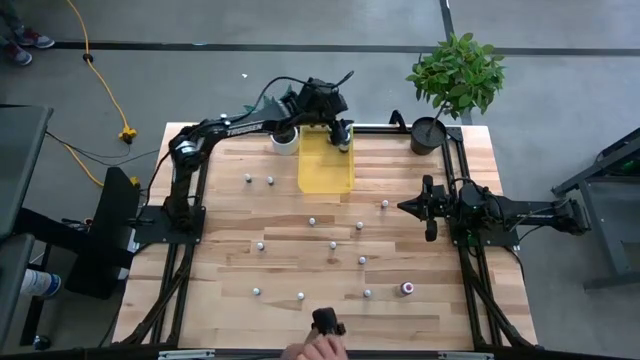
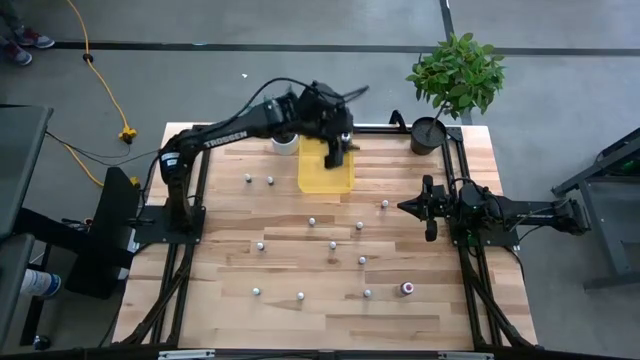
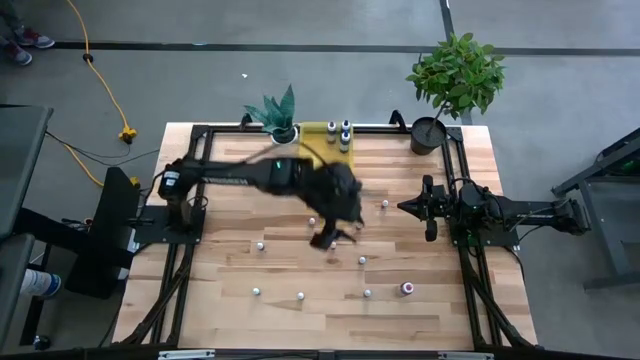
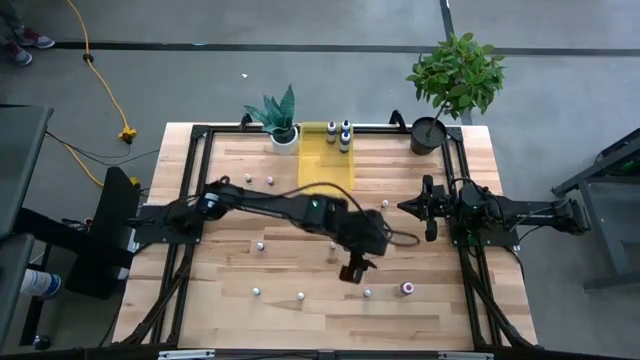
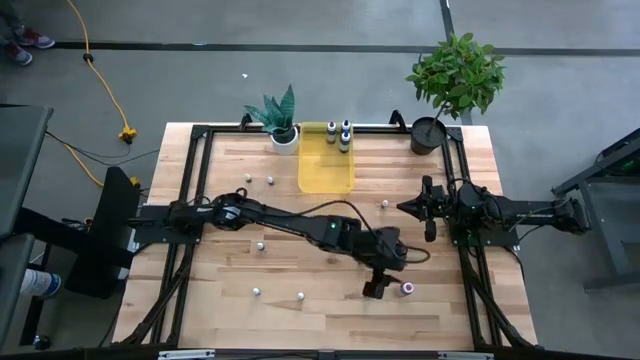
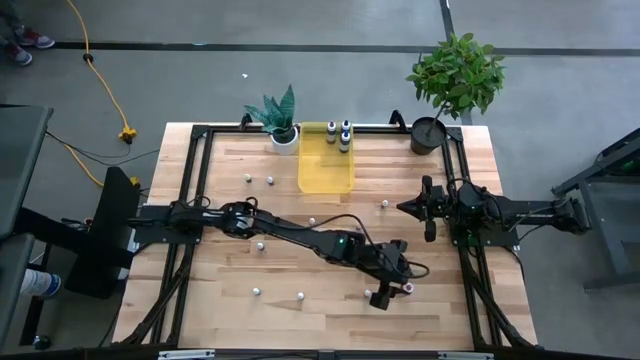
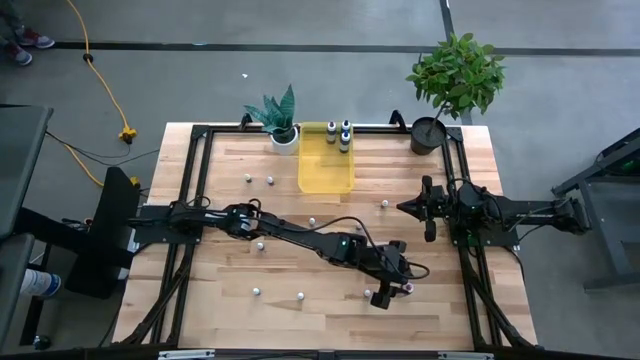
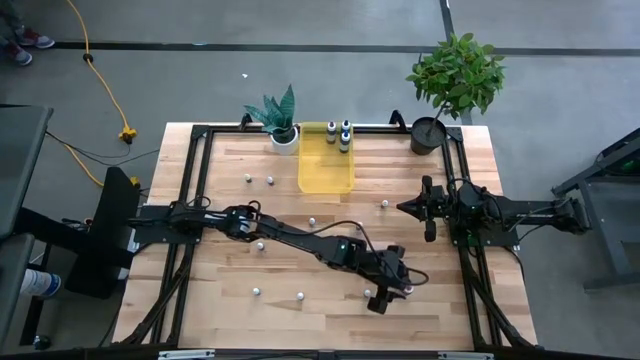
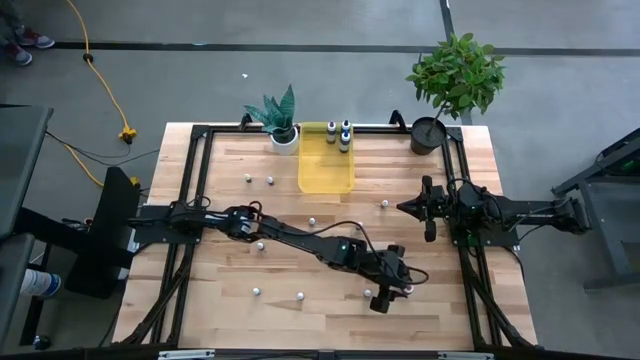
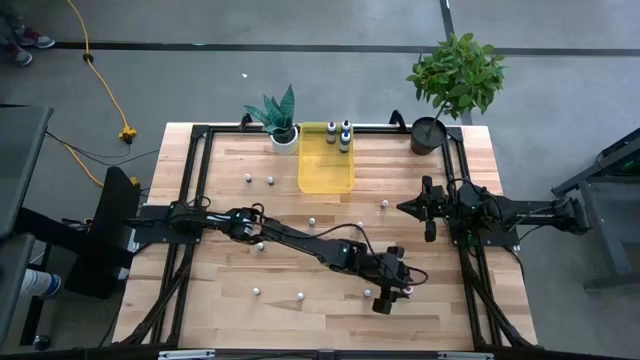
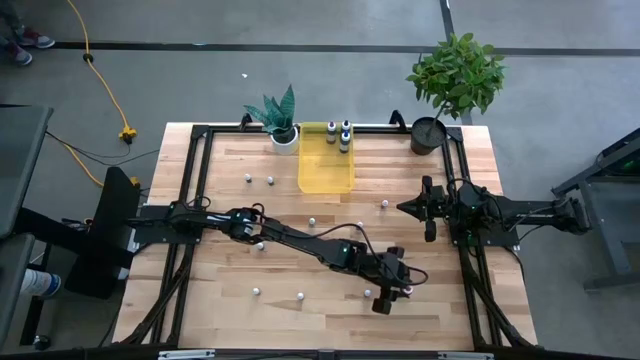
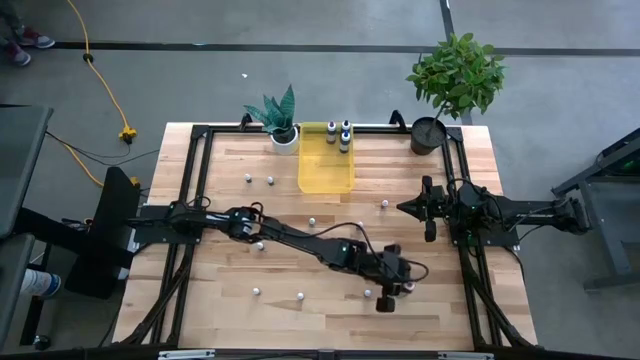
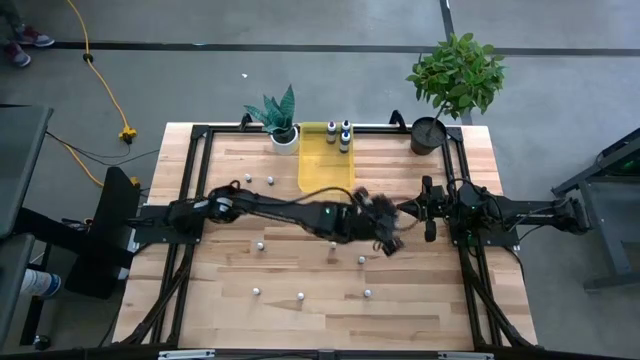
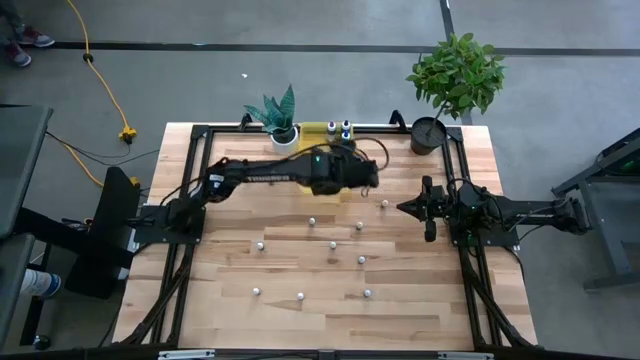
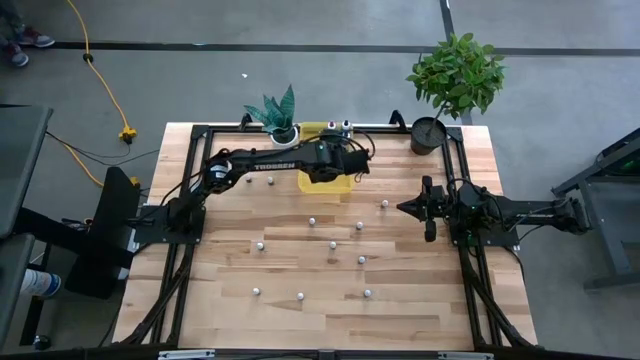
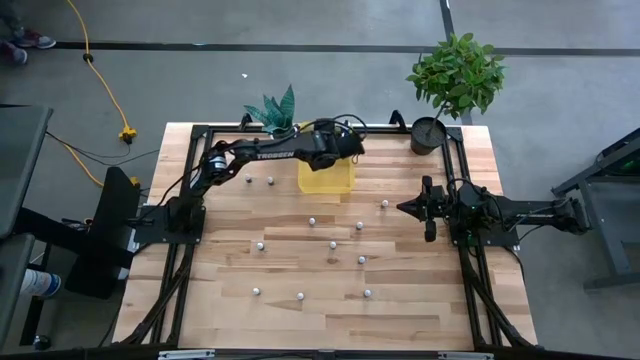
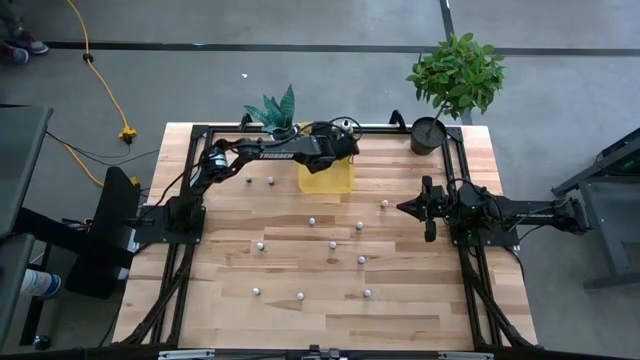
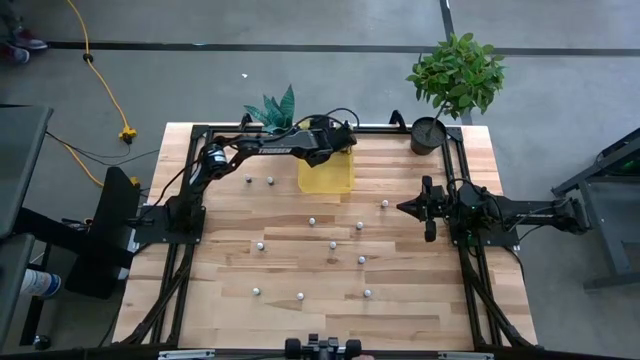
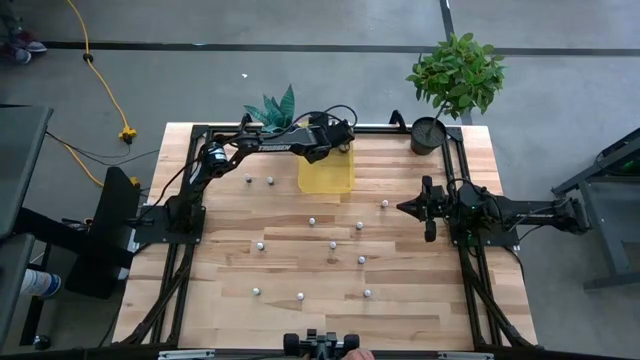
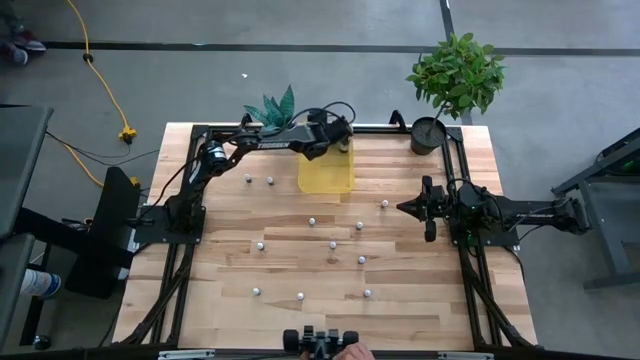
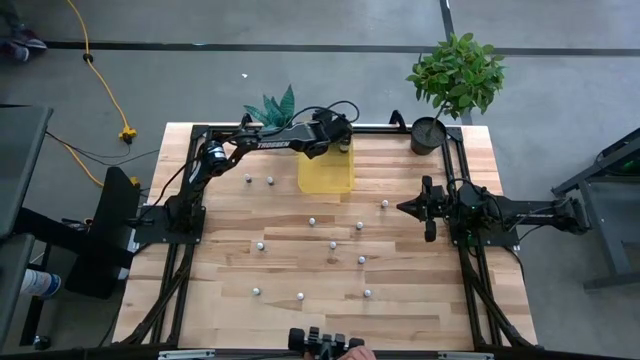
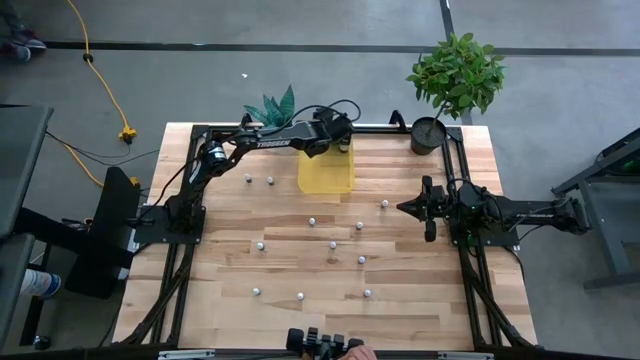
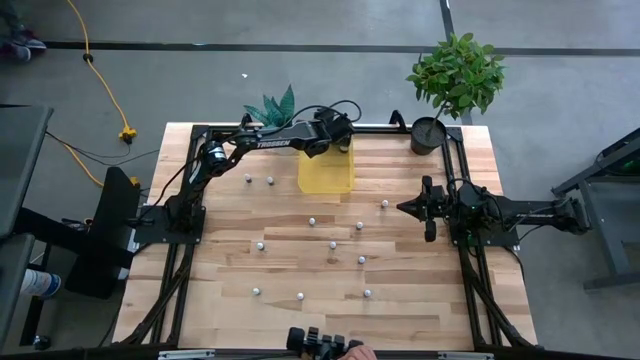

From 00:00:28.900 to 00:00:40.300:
Task: Pick & Place food coloring
Put the large pink food coloring bottle into the yellow bin

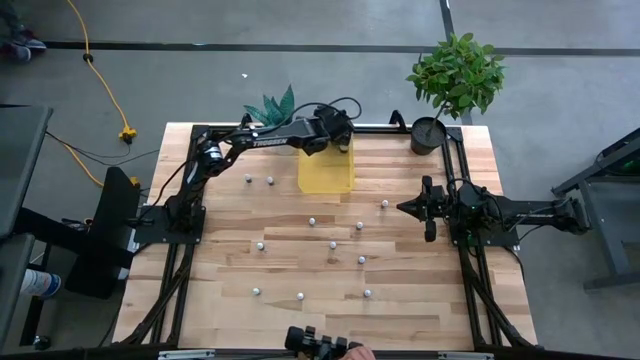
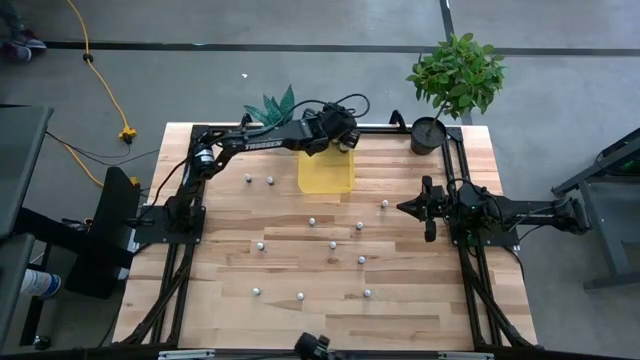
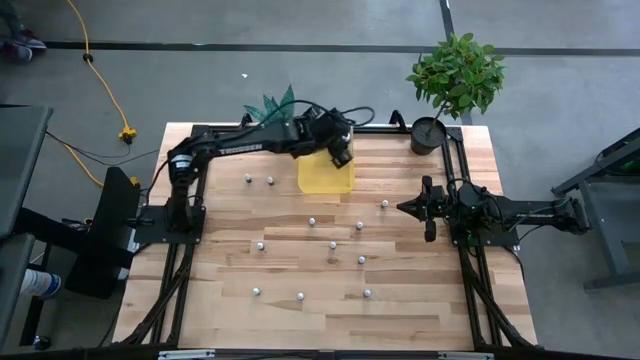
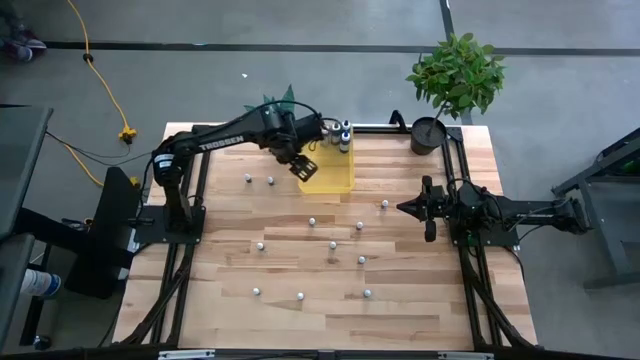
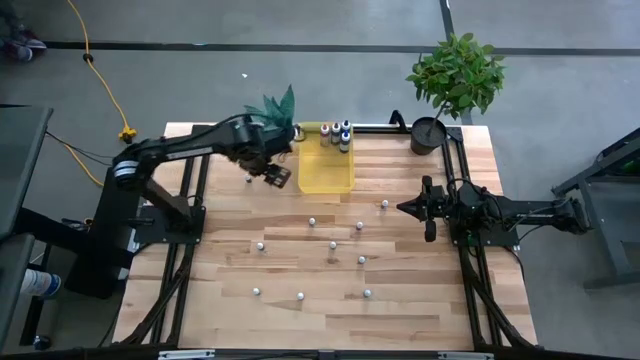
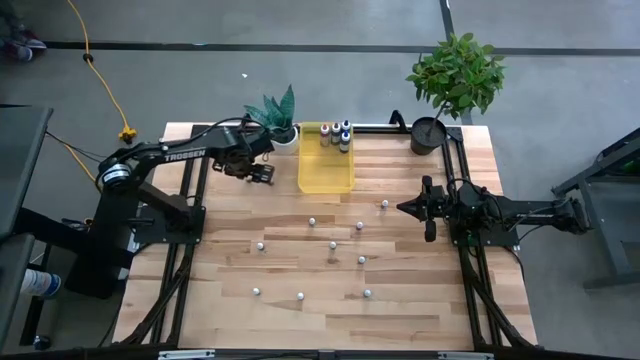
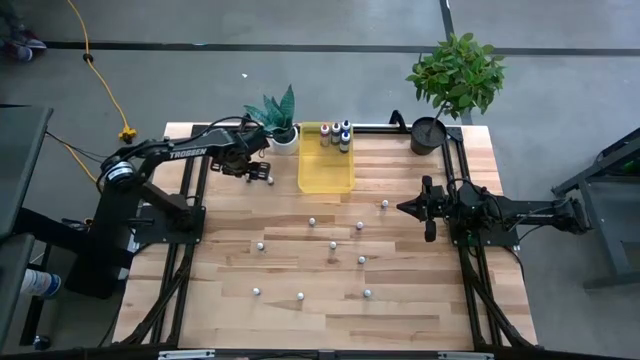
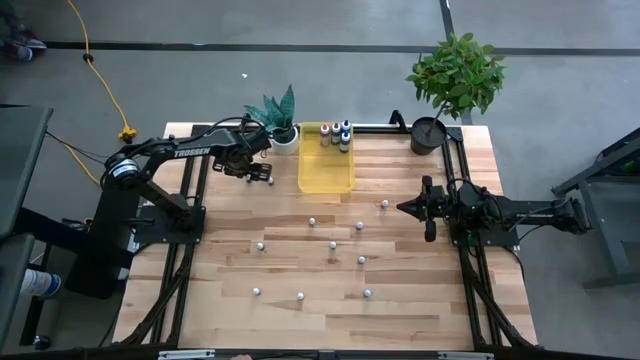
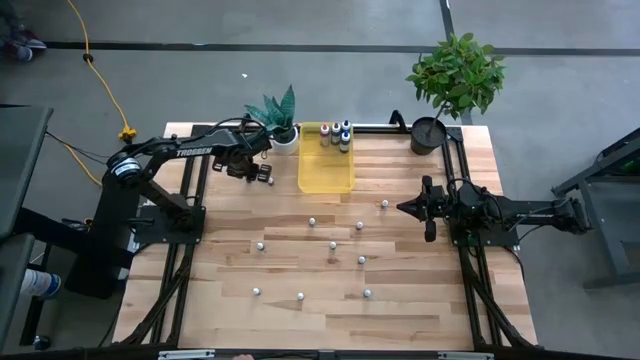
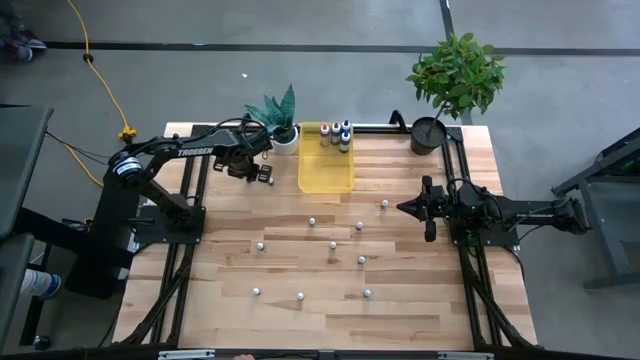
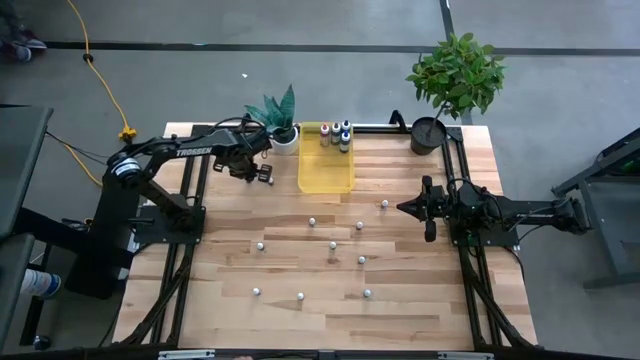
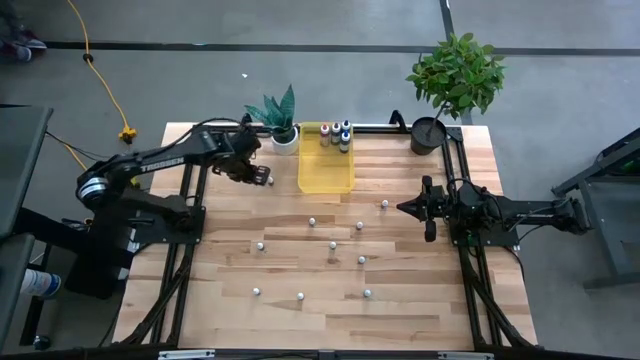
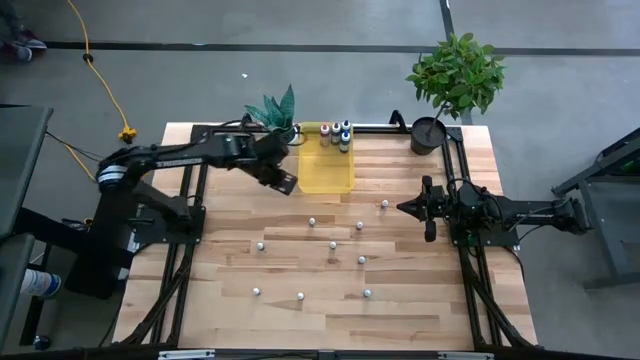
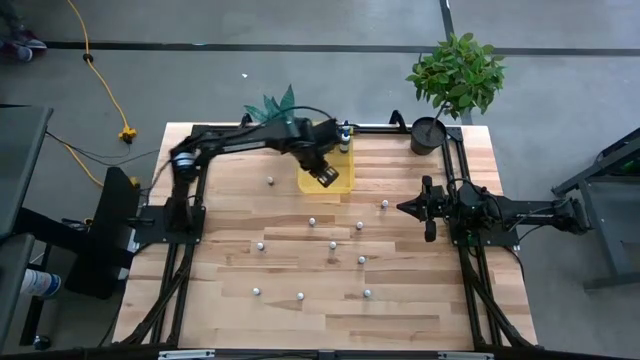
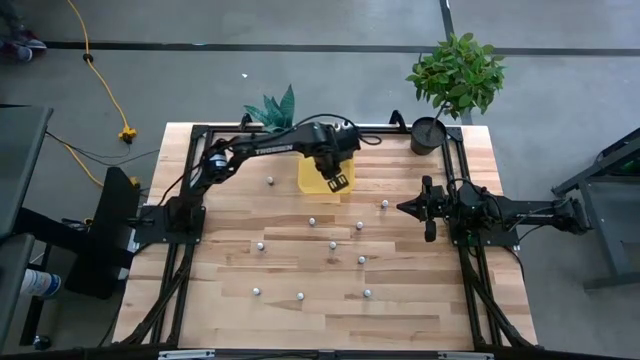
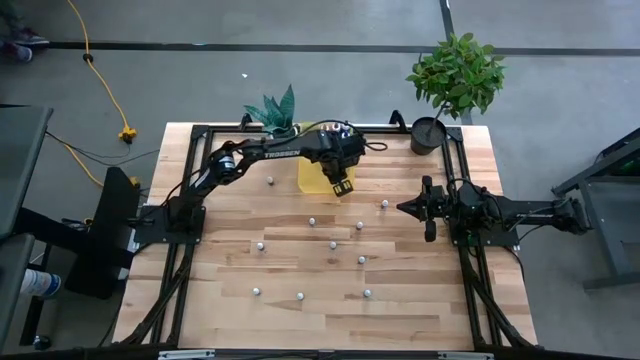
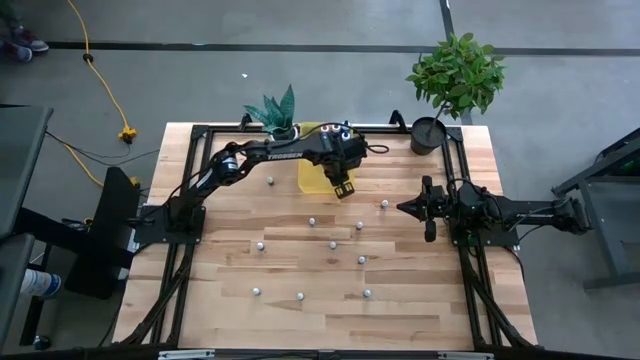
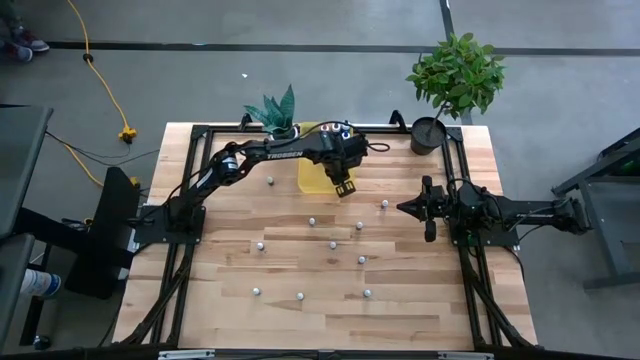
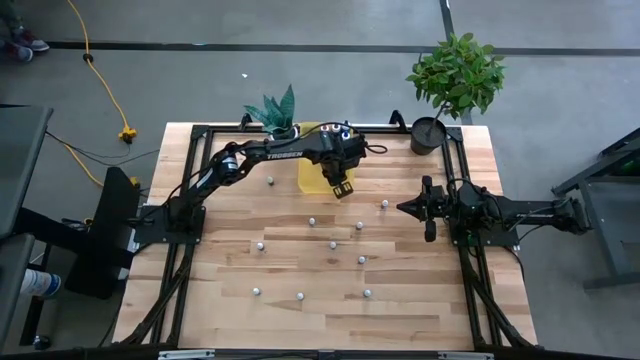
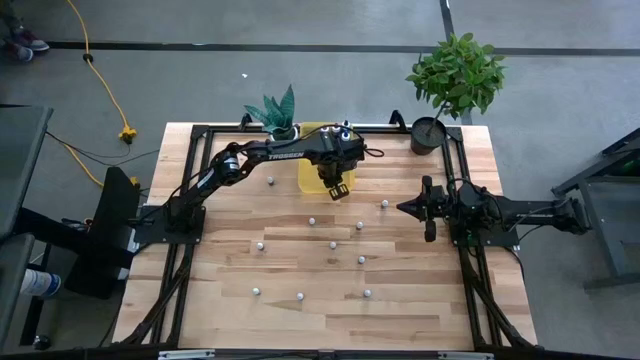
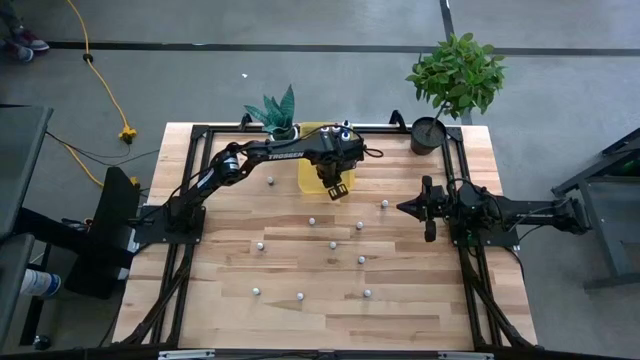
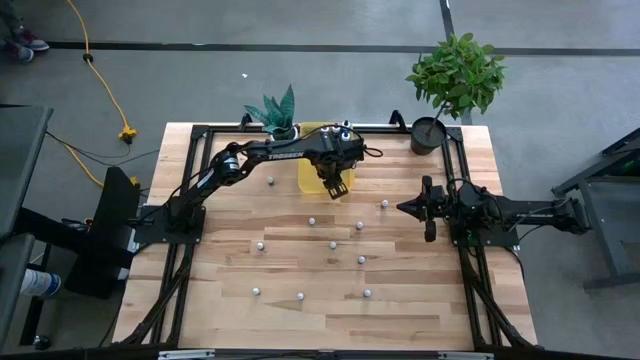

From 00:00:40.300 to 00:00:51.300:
Put the top small light green food coloring bottle into the yellow bin
